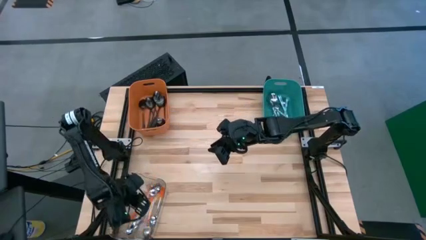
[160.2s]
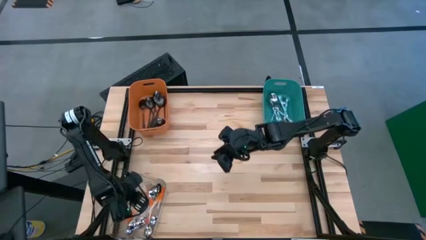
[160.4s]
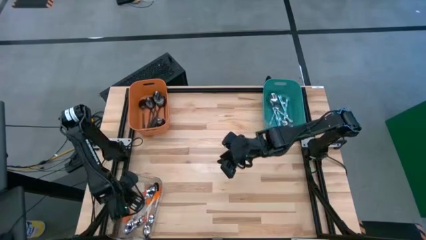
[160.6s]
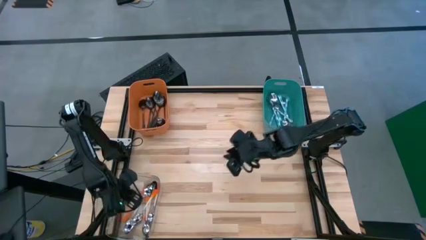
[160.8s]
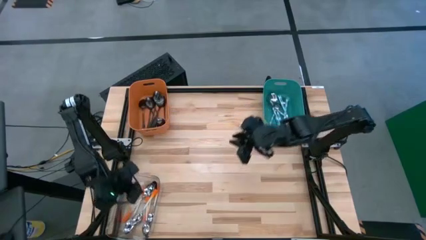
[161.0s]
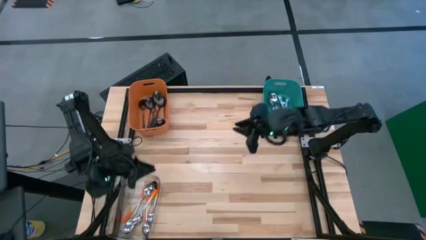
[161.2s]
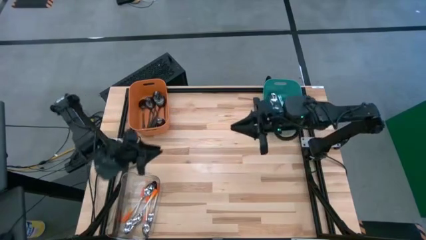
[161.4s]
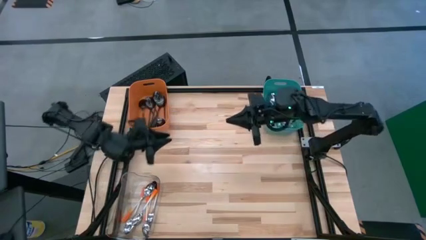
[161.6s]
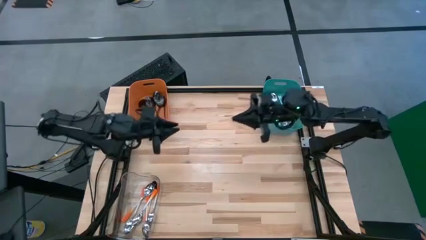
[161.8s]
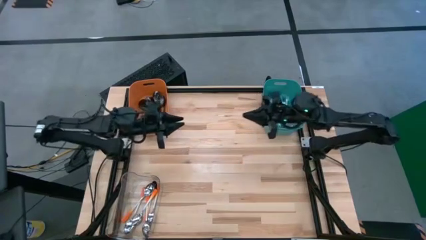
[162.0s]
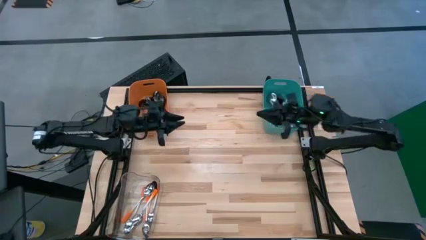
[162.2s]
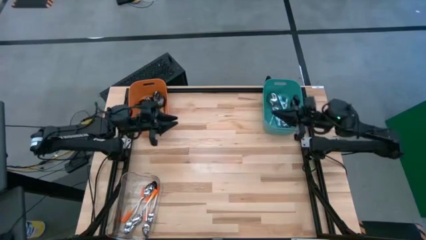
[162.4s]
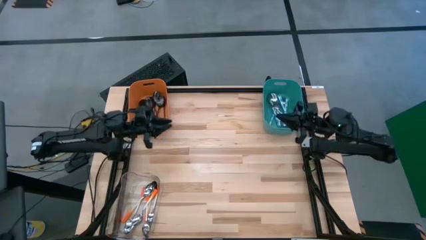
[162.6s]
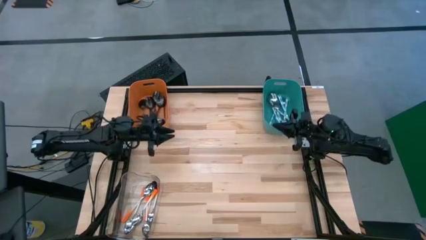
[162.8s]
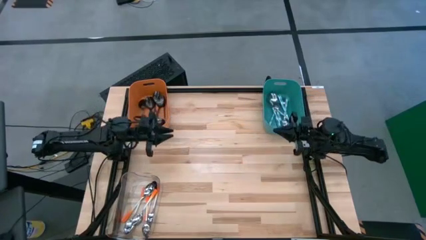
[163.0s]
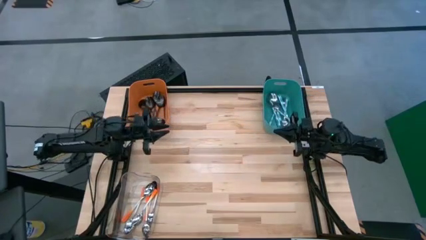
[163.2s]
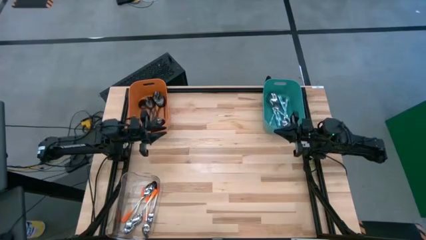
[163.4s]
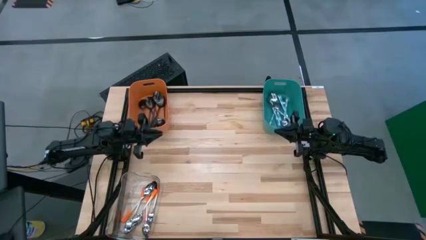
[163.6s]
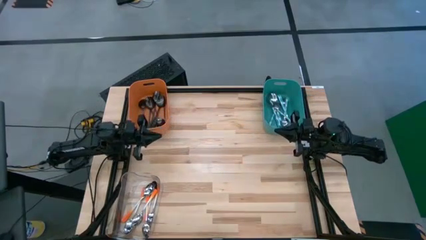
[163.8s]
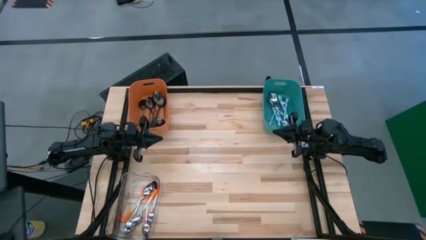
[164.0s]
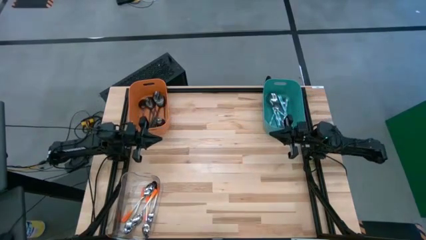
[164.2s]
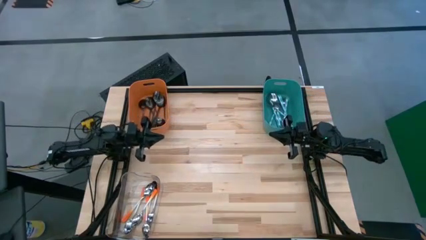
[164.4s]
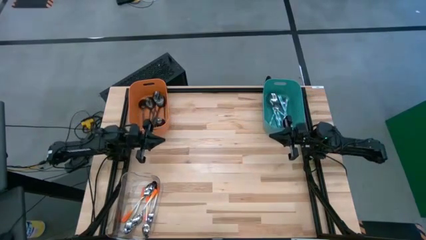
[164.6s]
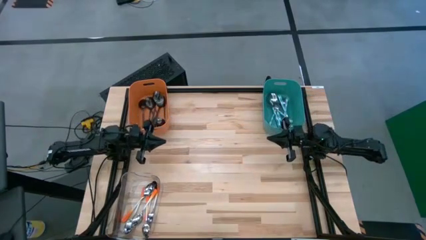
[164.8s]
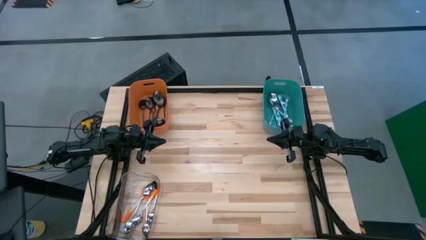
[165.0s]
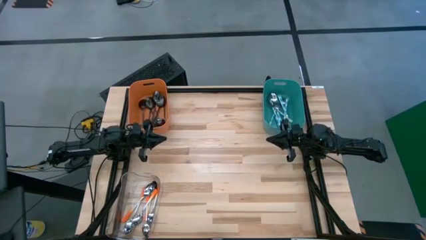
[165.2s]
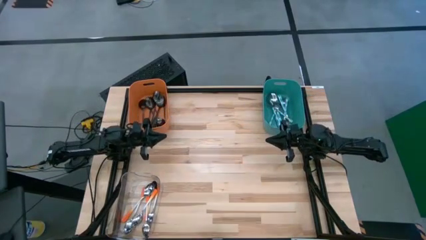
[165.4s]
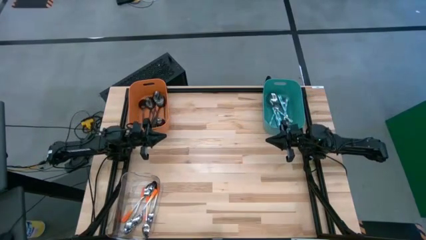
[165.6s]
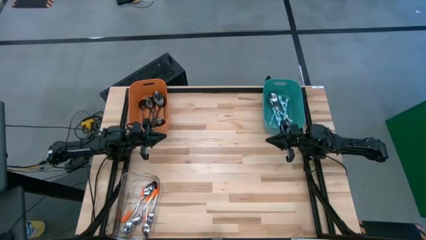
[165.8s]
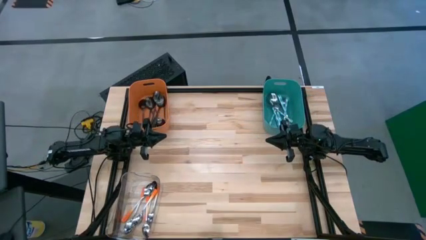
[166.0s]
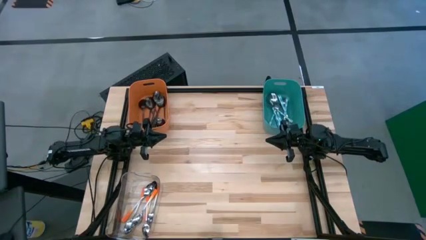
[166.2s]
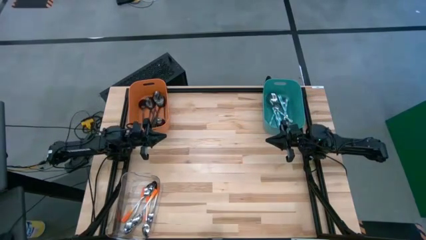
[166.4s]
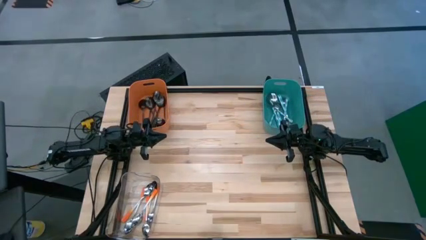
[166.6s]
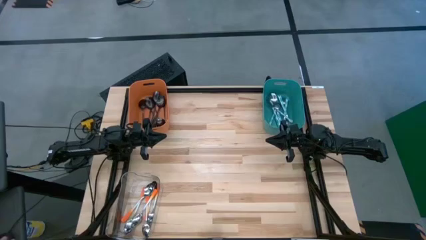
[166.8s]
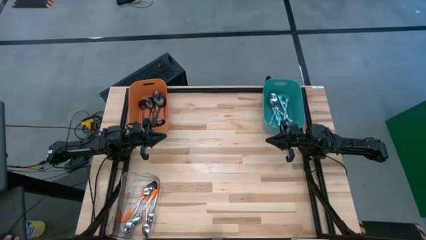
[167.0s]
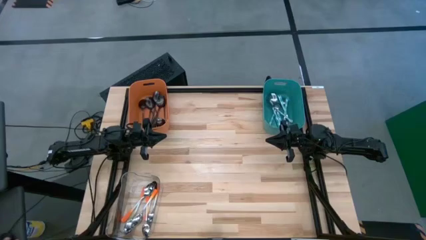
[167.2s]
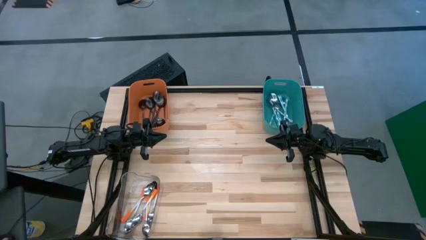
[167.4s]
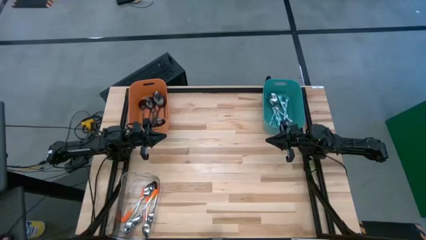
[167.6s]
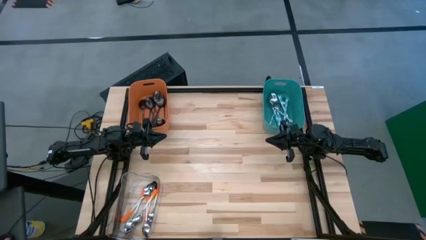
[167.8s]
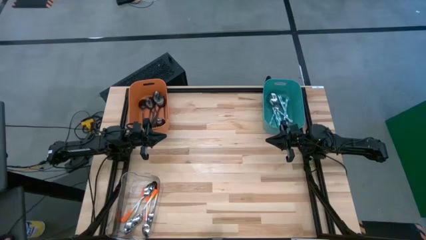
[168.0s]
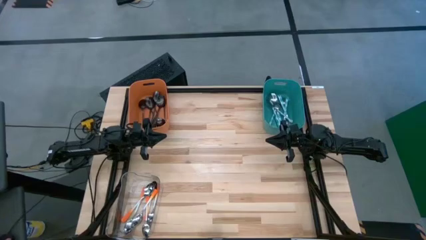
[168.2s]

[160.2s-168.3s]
Task: Sort silverware by color (type)
Return to Home Position

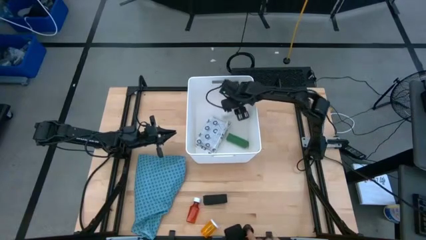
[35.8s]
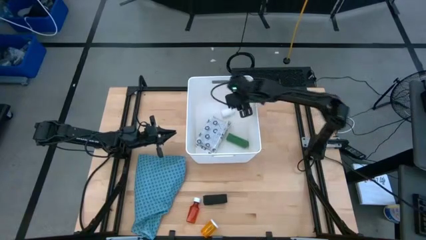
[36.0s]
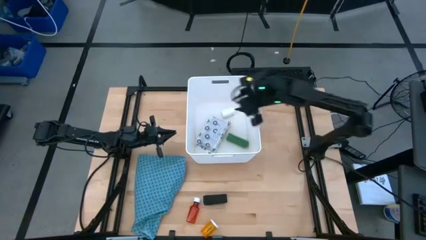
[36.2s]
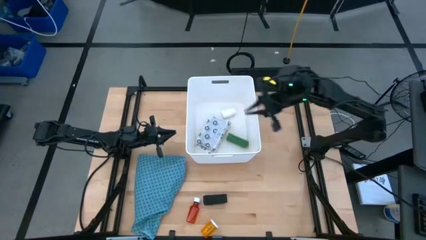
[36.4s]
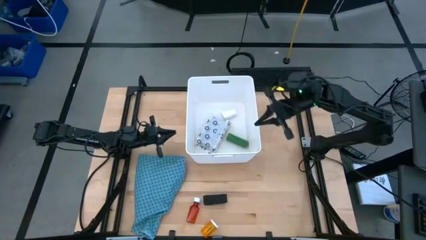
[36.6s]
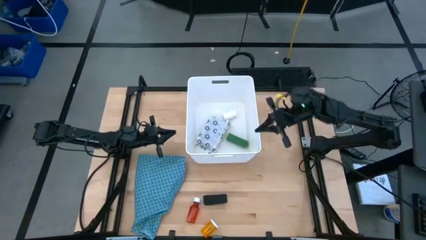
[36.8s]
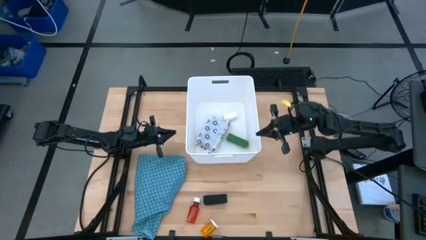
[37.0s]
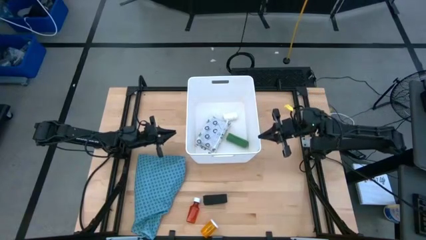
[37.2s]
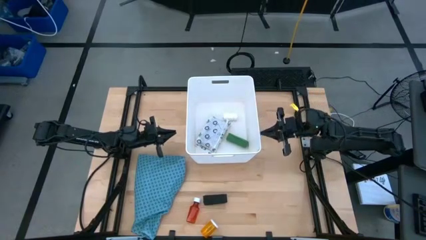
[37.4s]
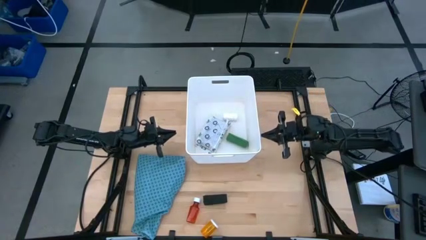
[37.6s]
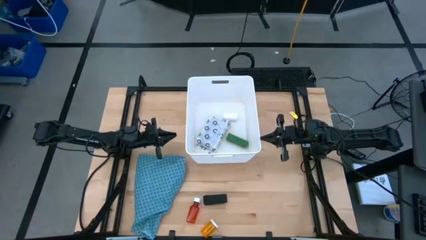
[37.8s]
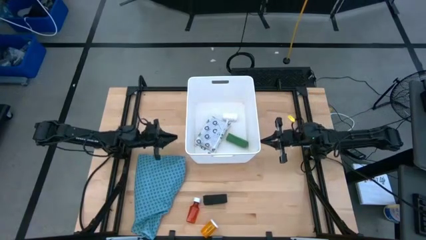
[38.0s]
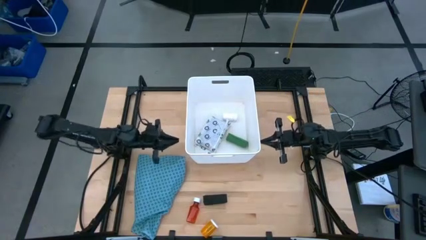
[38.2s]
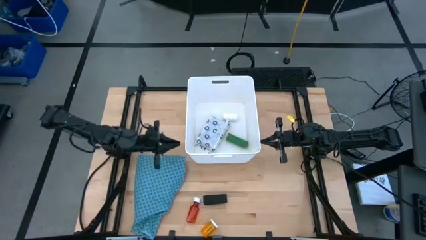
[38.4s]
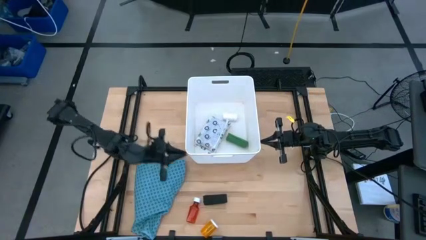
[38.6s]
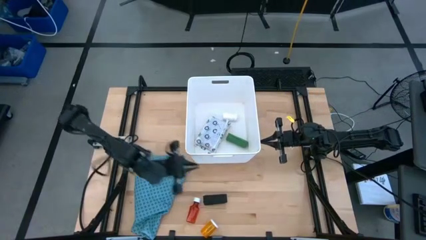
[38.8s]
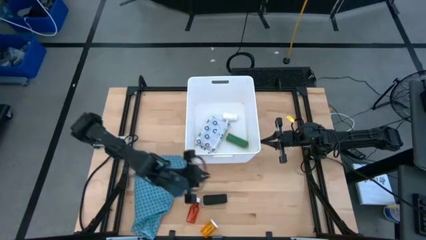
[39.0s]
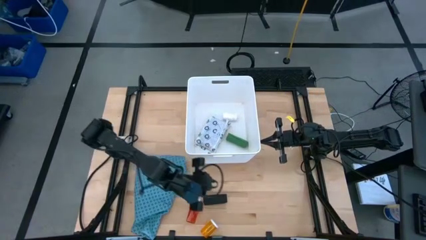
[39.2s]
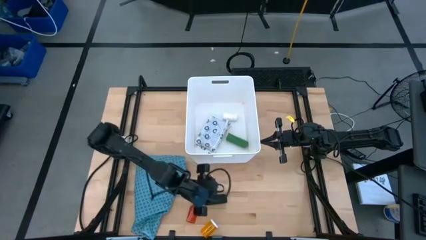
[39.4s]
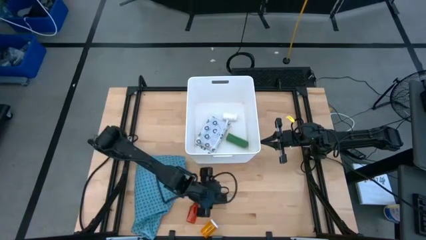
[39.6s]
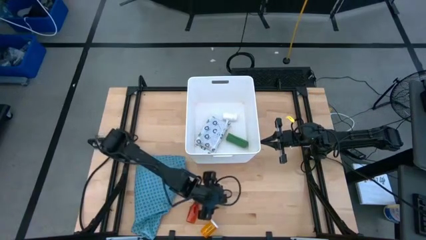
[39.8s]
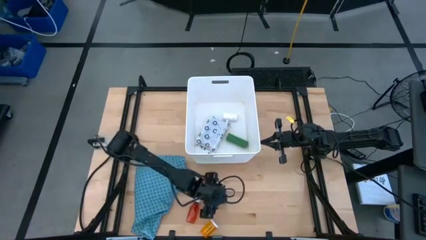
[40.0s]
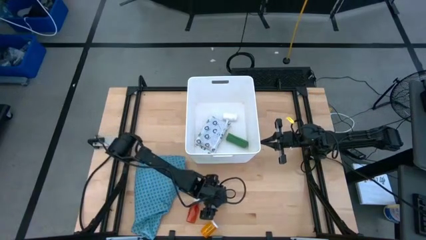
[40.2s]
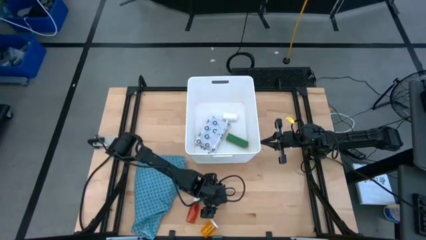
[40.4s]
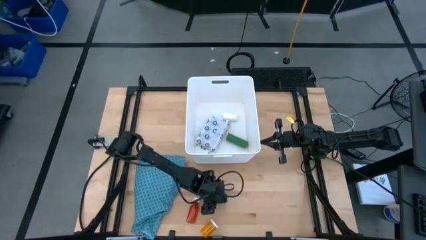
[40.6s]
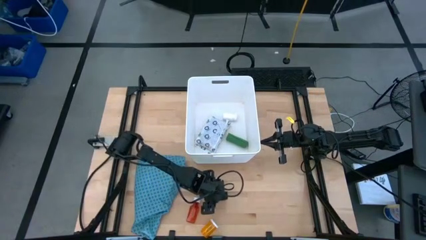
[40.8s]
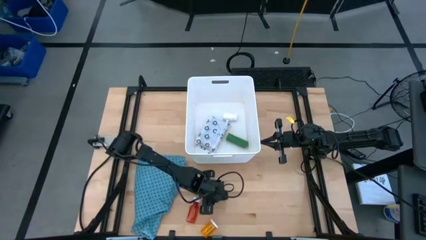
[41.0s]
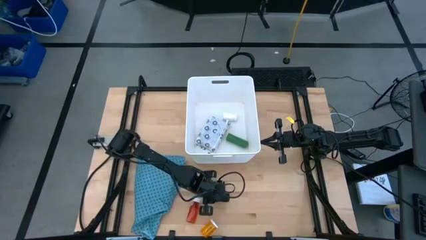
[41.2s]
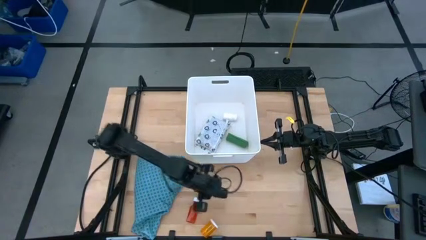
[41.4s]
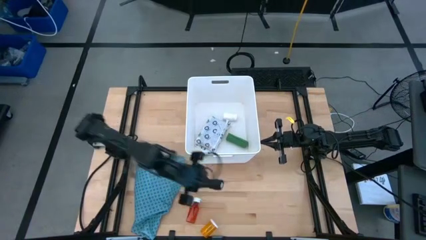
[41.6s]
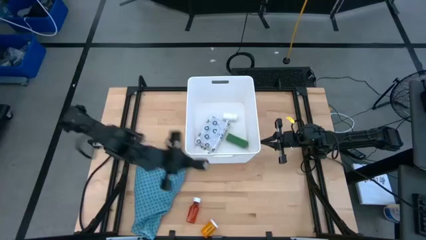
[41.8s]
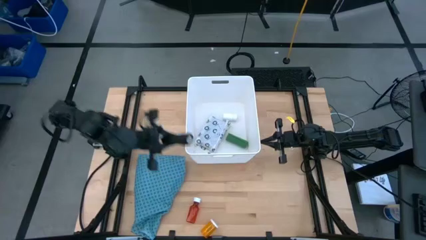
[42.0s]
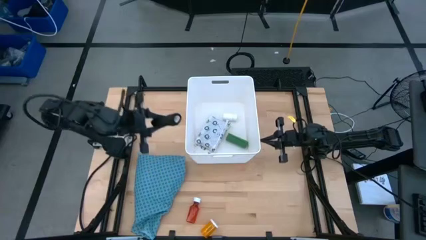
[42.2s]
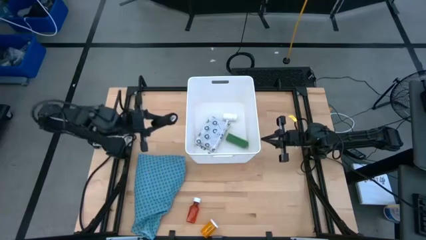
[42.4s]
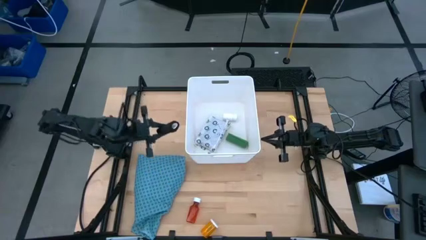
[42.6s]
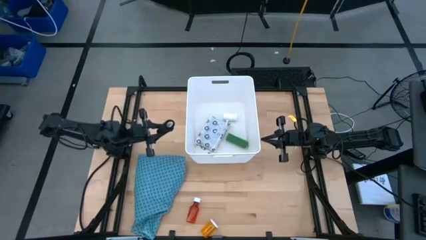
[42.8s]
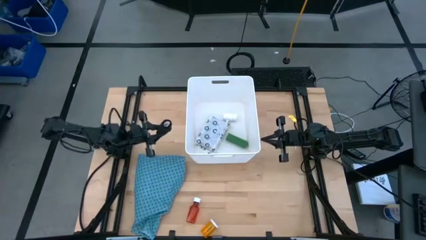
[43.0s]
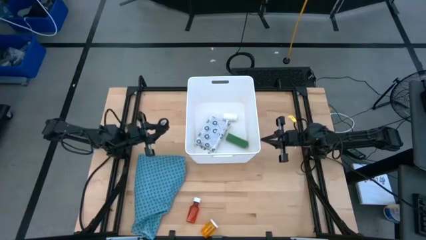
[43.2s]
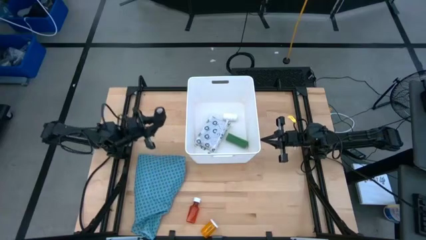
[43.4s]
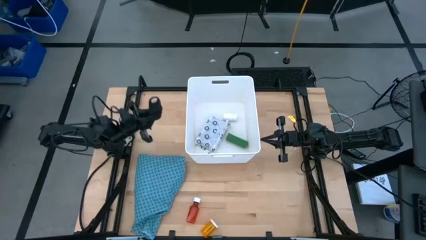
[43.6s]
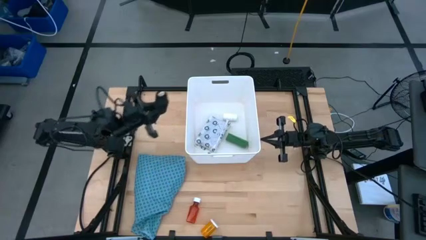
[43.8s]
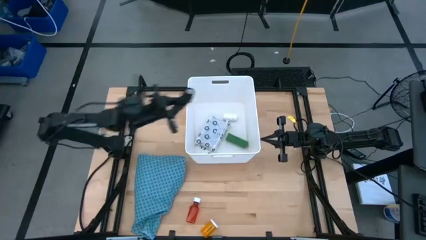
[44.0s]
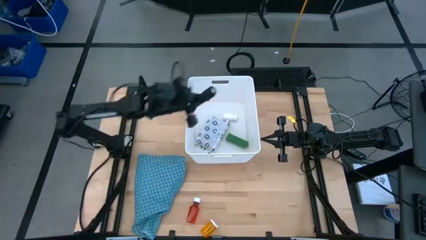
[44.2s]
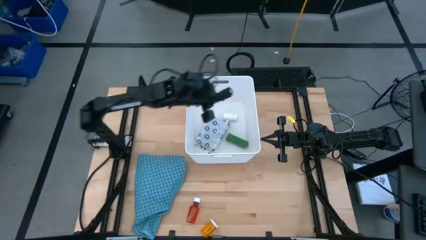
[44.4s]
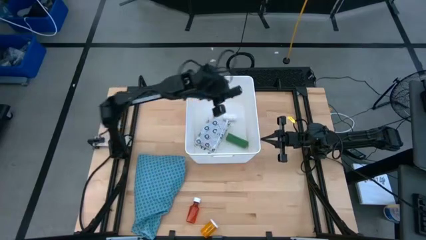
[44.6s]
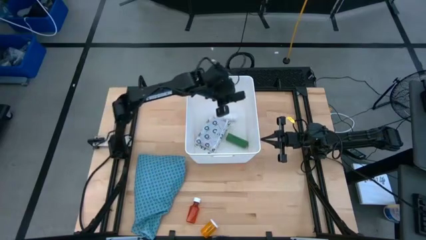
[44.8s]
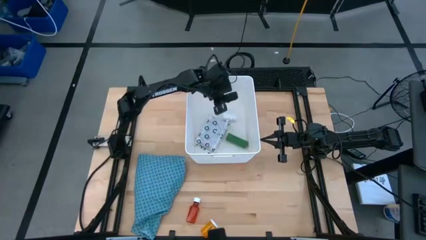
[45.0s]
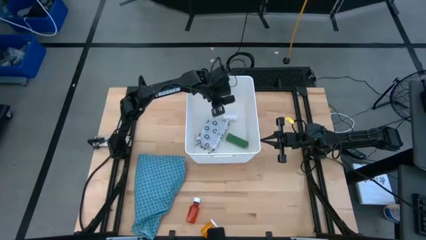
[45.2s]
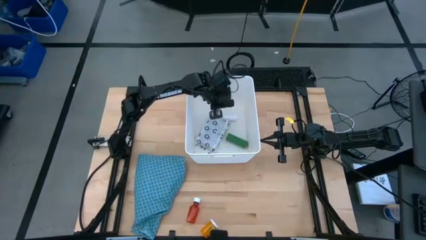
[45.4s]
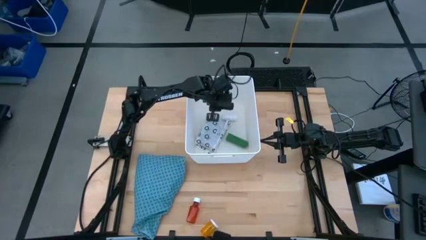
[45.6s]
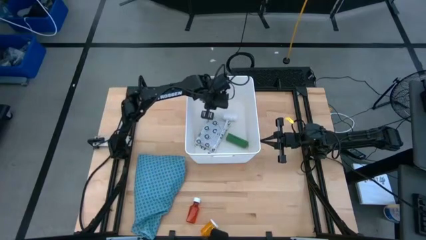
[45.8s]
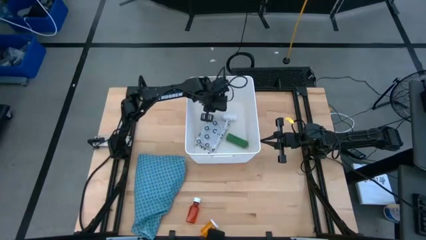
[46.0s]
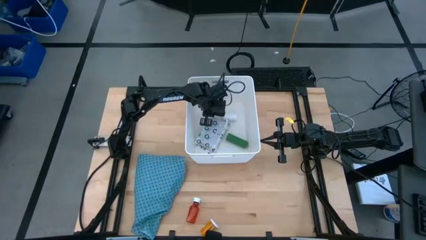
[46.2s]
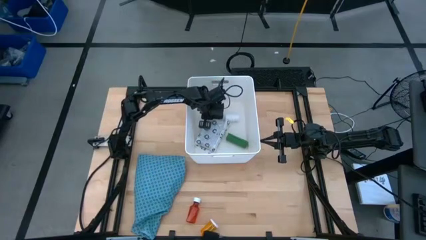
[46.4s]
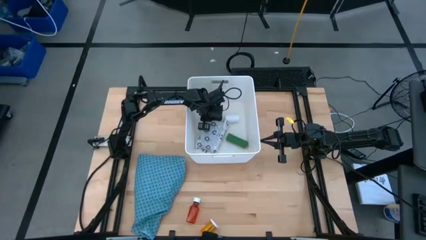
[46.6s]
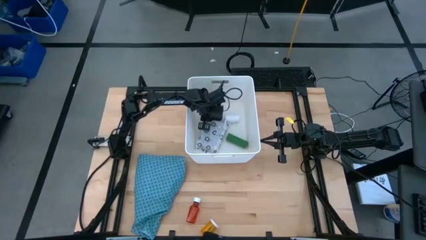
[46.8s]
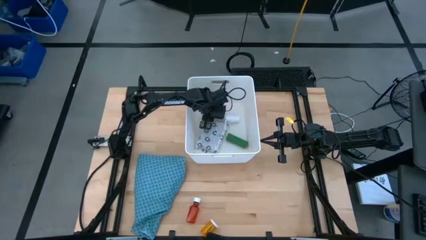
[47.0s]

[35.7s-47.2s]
Task: Pick & place medical supplies in basket/bin
Put the black bandage into the white bin
